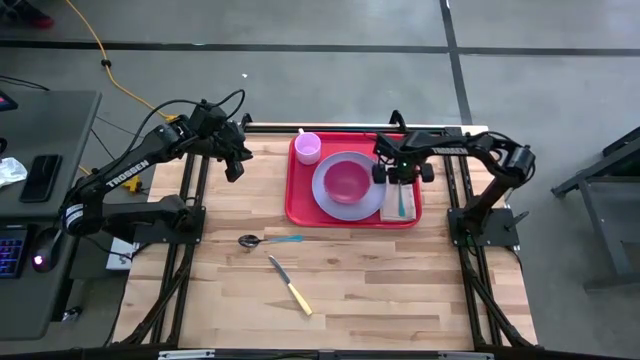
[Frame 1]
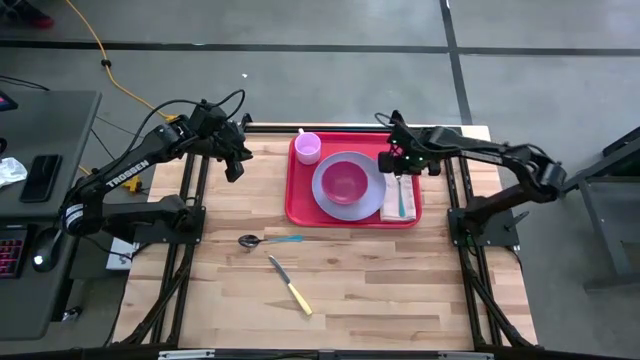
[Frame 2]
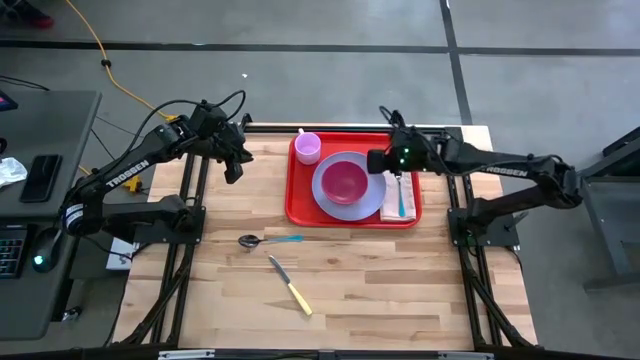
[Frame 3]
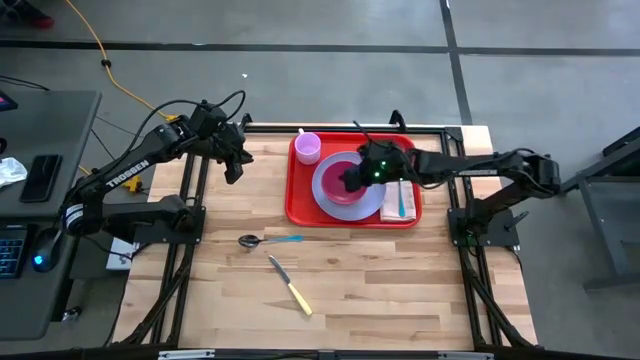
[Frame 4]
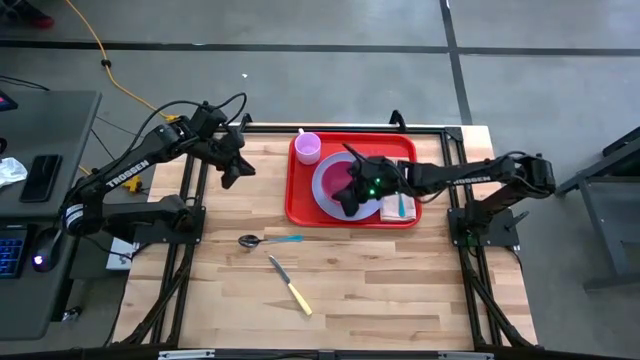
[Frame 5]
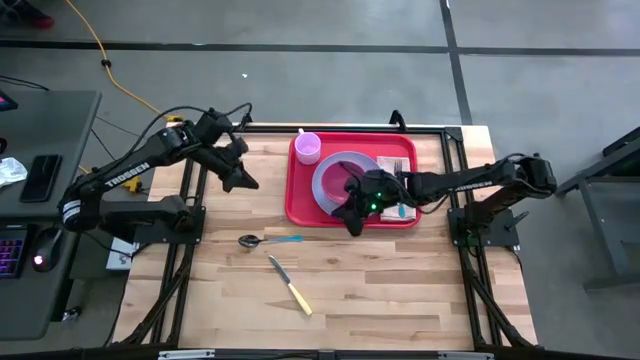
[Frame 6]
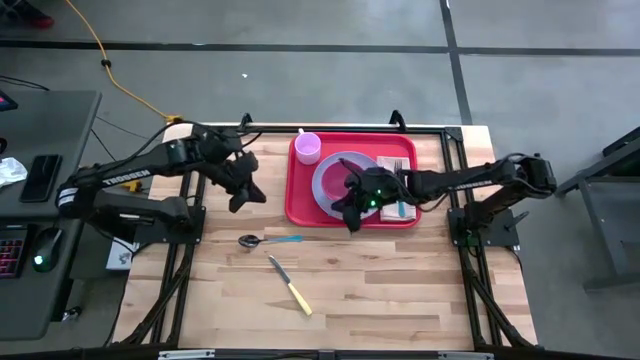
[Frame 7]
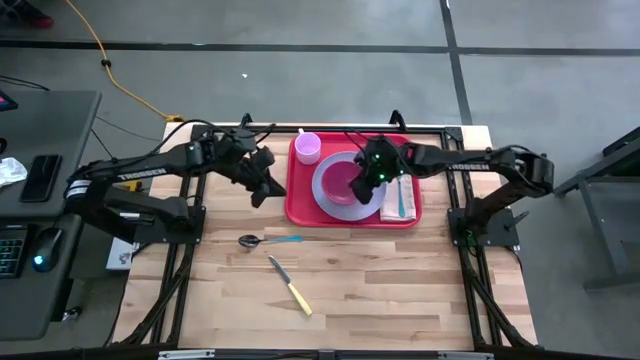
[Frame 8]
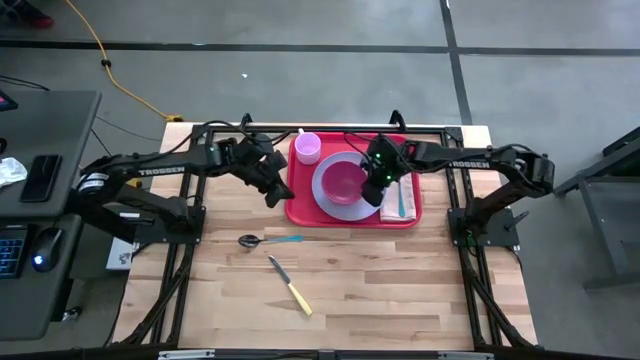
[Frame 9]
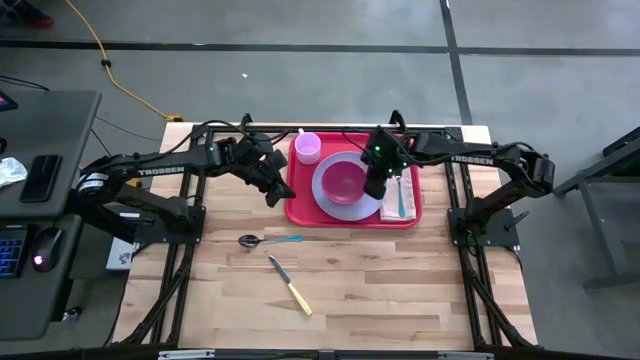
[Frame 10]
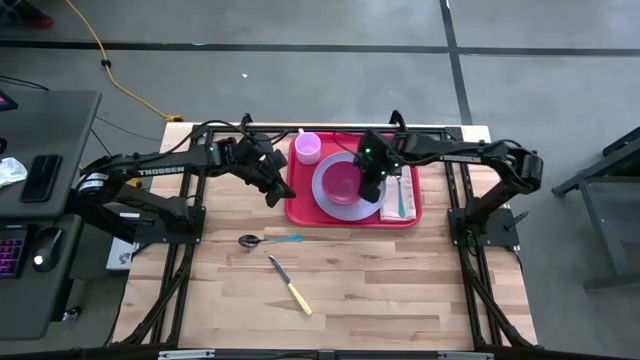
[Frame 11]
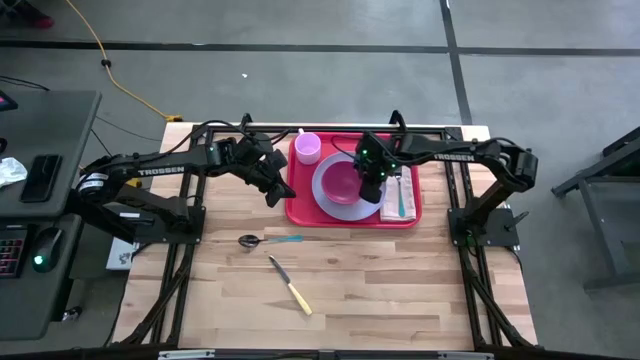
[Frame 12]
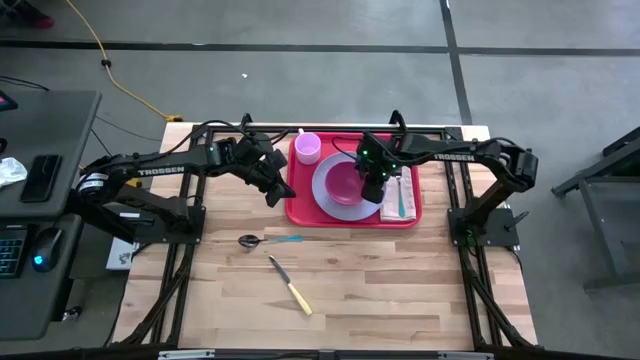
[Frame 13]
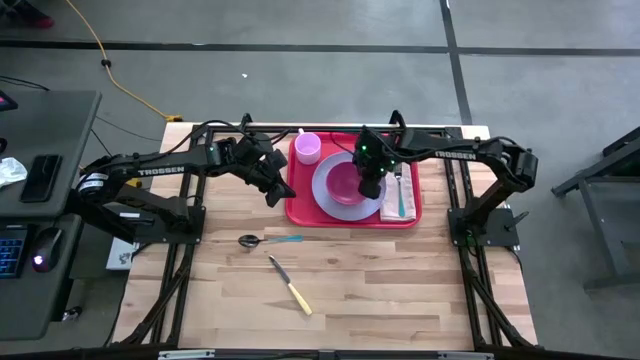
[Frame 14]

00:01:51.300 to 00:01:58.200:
Task: Set up tray
Adjust the pink bowl

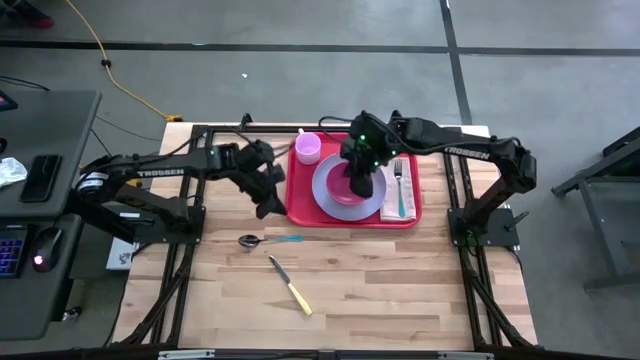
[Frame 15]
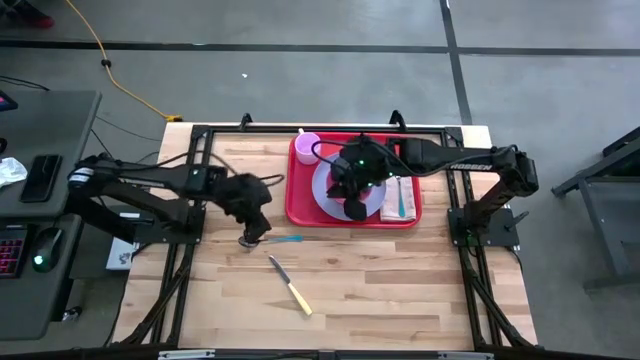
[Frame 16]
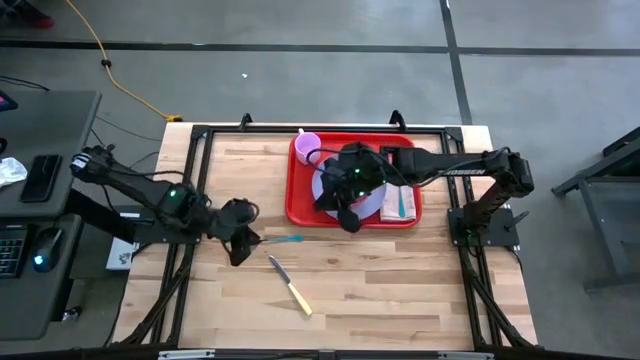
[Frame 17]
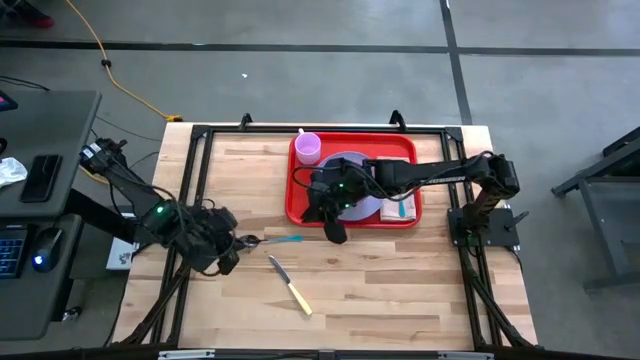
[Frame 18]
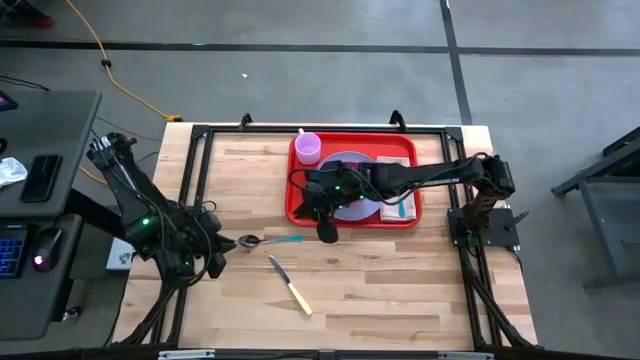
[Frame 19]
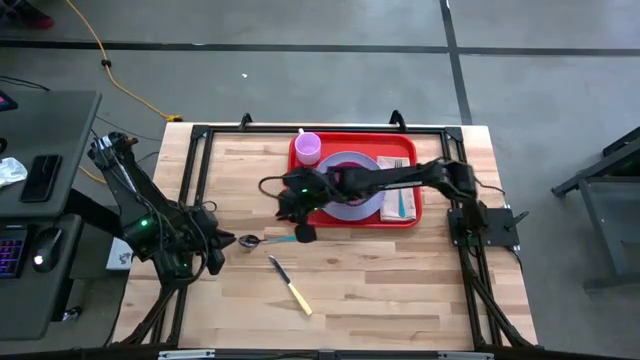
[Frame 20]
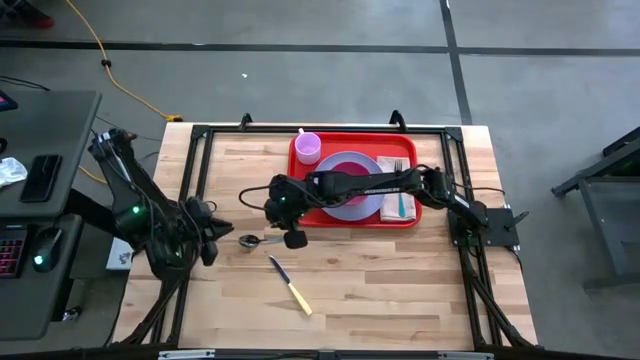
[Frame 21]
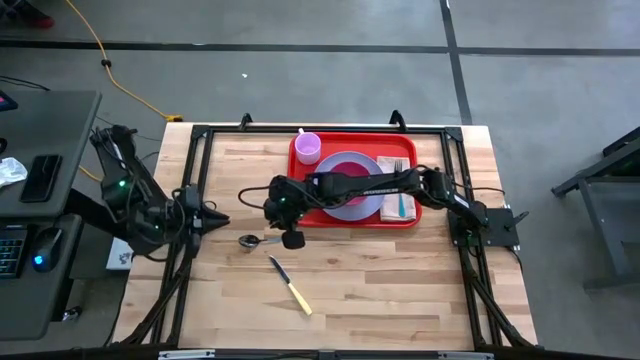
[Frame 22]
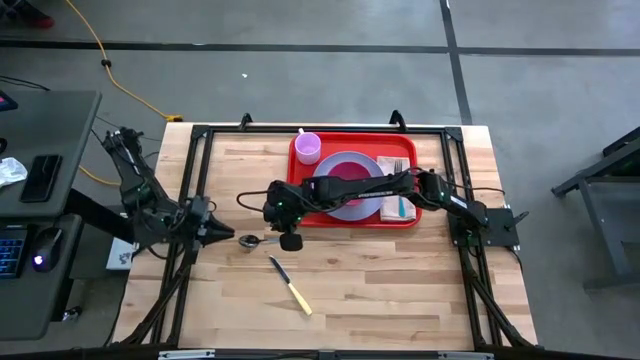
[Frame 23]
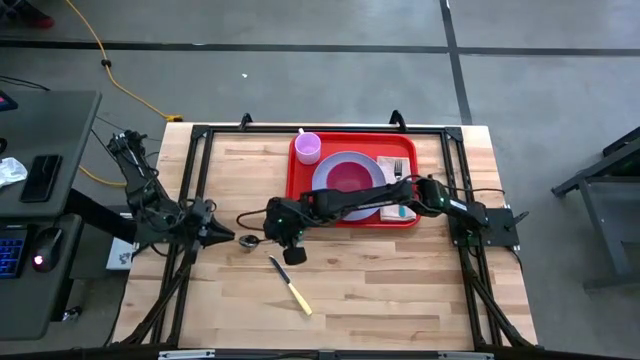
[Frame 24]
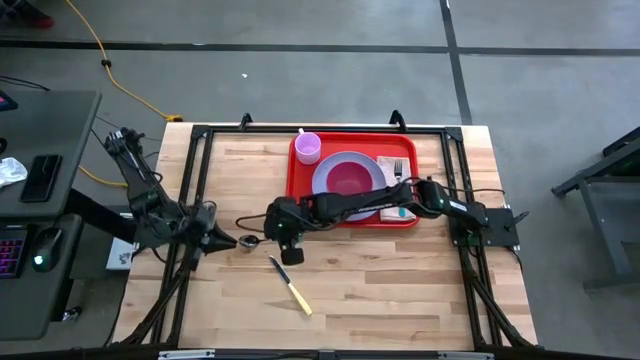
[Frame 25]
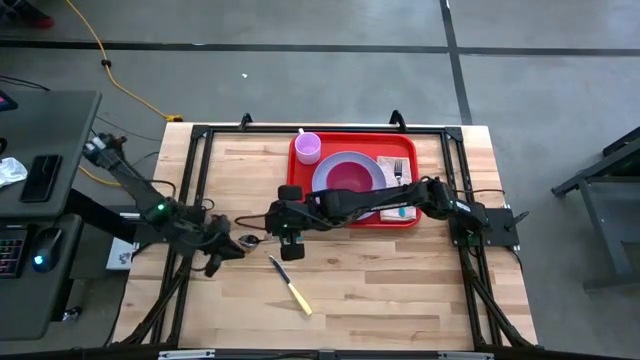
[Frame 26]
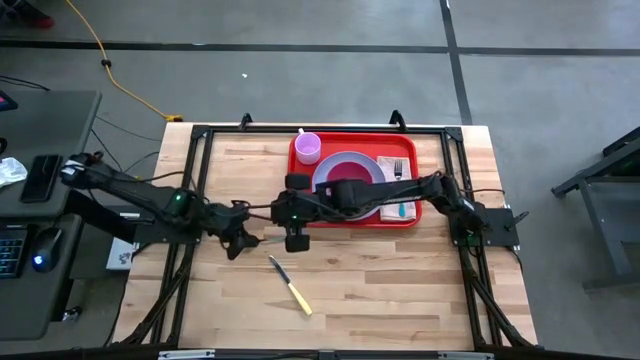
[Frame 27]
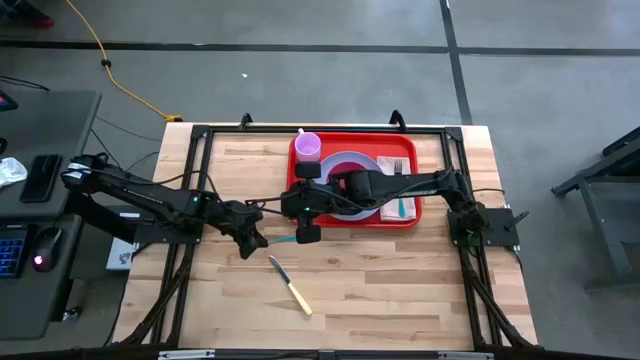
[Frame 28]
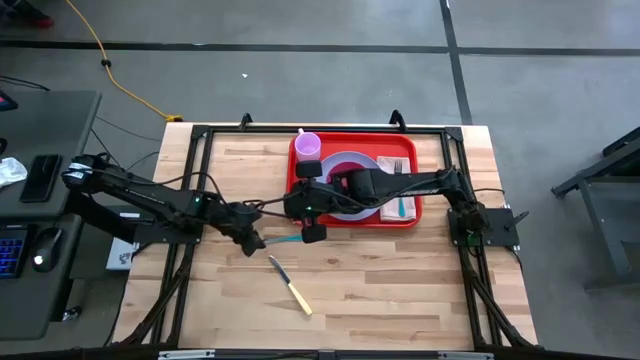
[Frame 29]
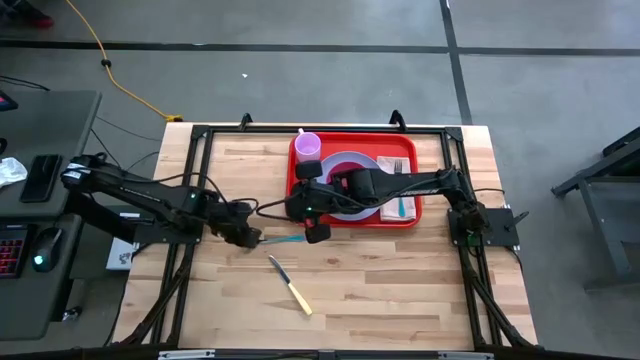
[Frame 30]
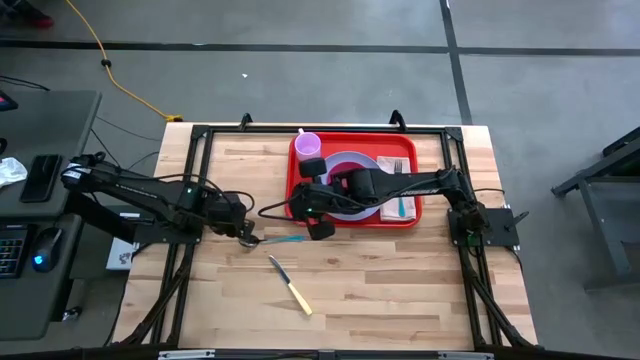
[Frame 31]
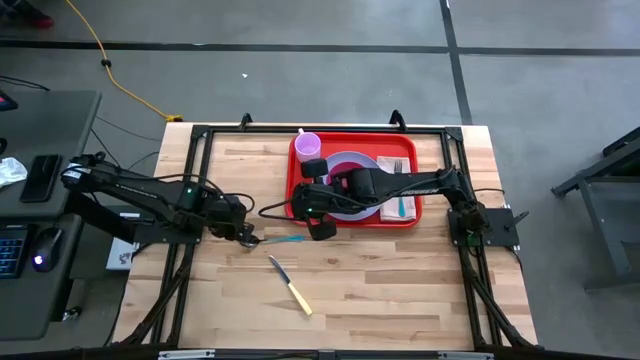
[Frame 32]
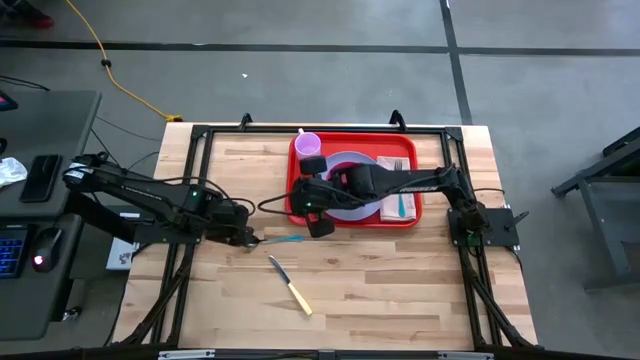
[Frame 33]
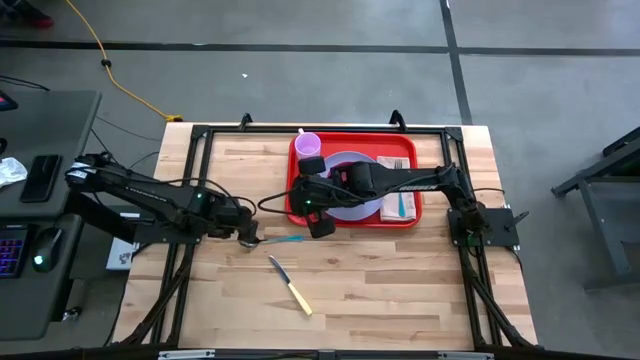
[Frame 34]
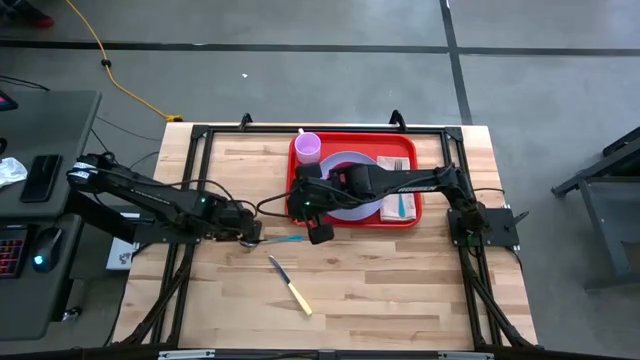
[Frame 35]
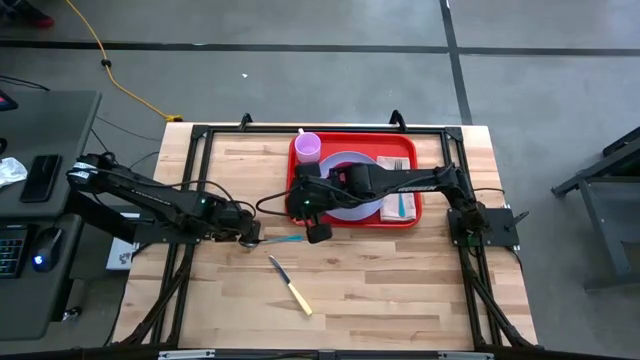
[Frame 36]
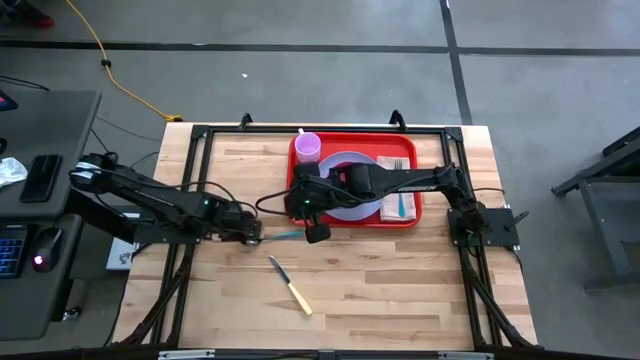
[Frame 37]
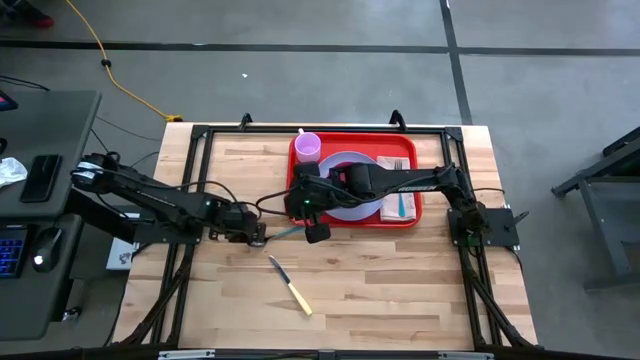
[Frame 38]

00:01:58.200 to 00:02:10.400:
Put the blue spoon on top of the napkin to the right of the purple plate in the red tray

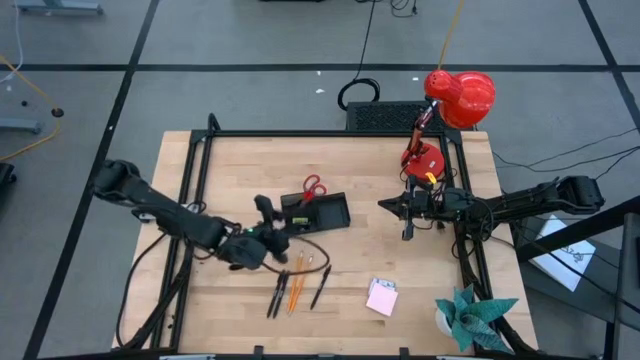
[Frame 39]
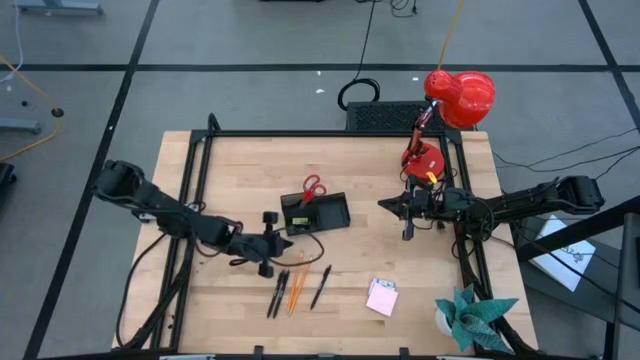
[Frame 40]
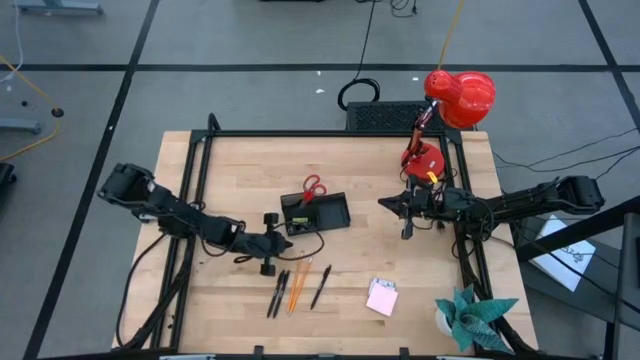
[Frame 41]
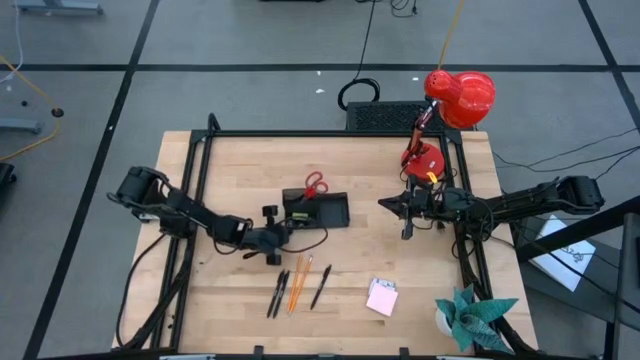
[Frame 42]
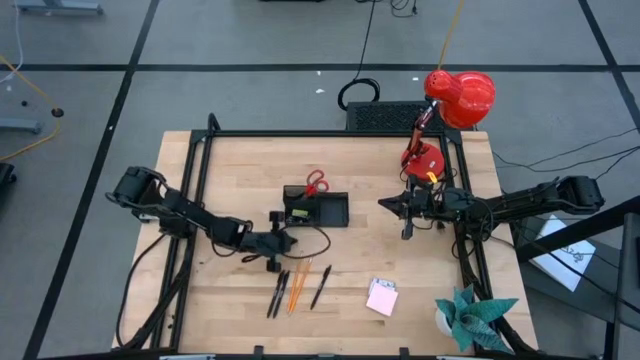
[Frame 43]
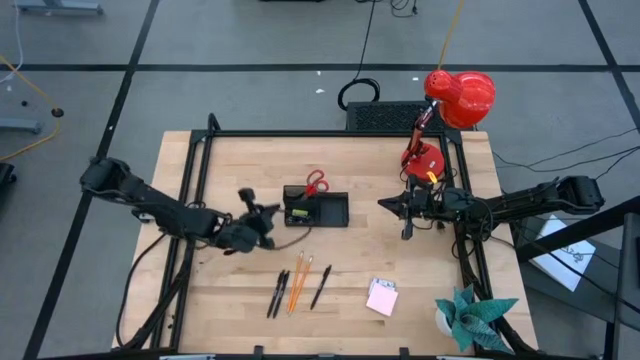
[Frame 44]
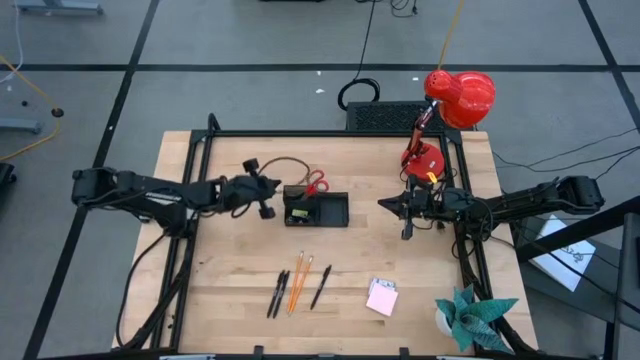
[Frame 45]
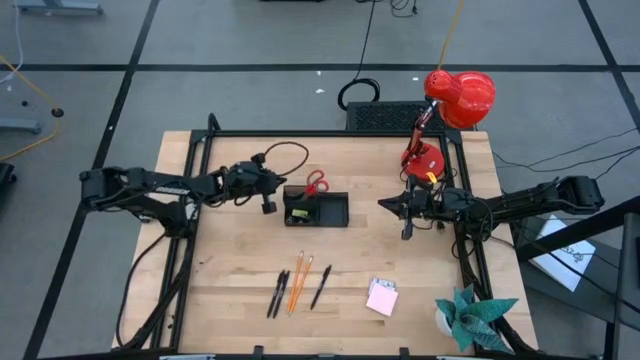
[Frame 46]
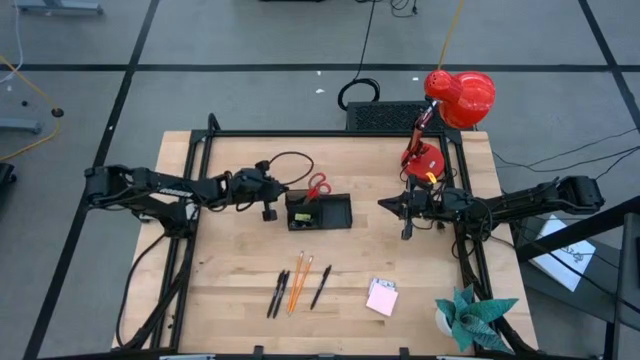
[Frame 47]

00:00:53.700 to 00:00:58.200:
Task: Pick and place office supplies into organizer
Adjust the desk organizer
